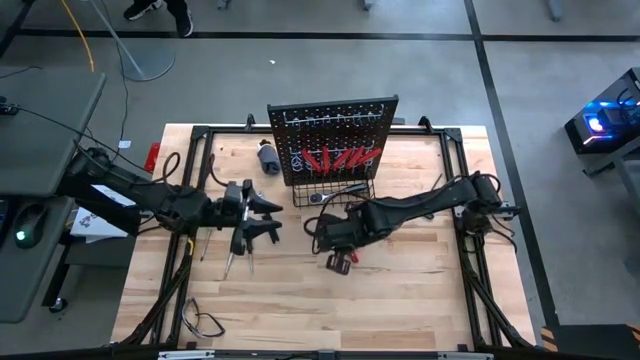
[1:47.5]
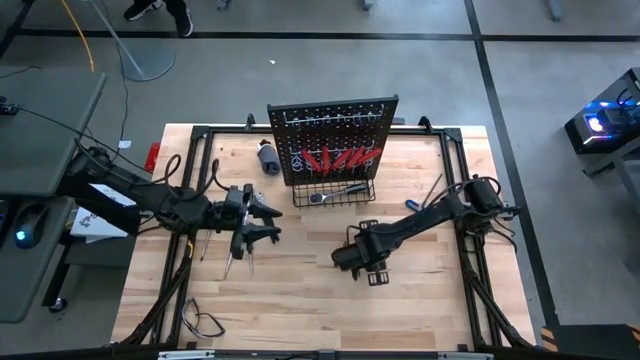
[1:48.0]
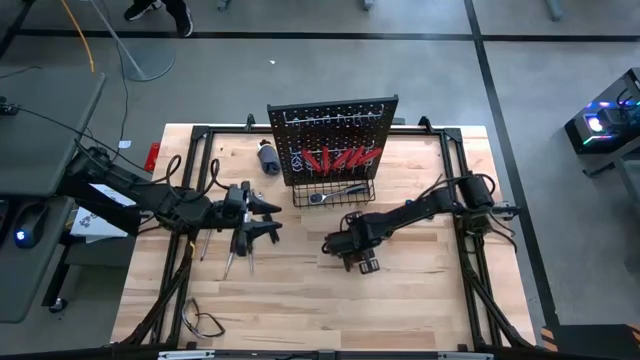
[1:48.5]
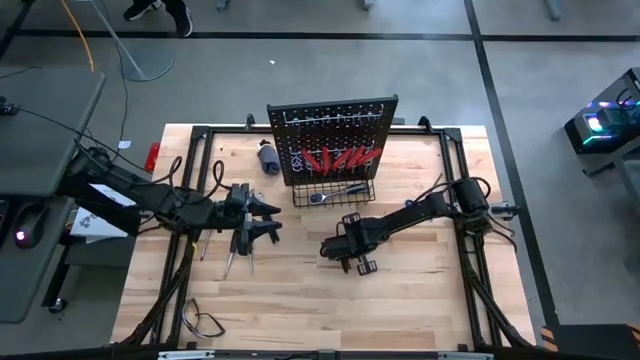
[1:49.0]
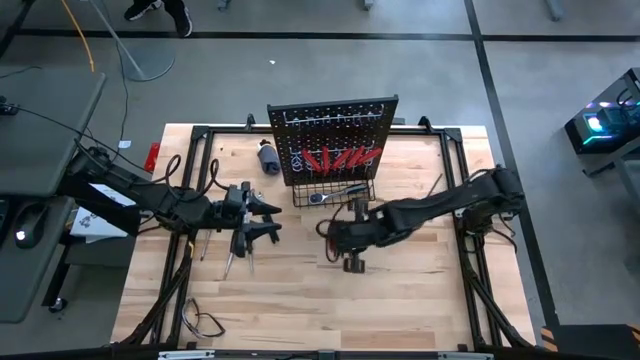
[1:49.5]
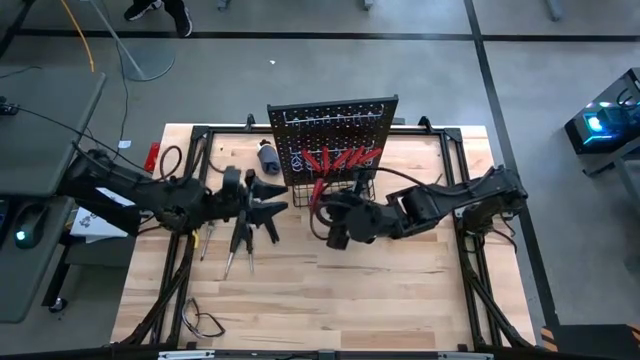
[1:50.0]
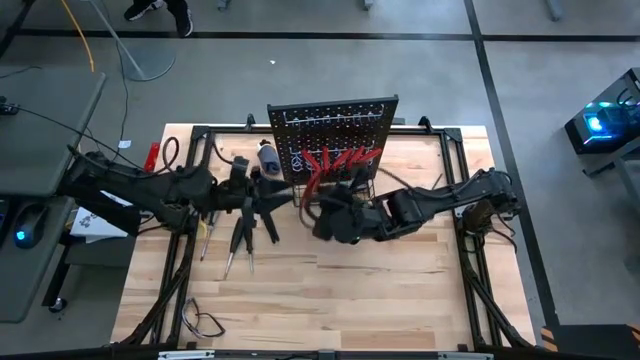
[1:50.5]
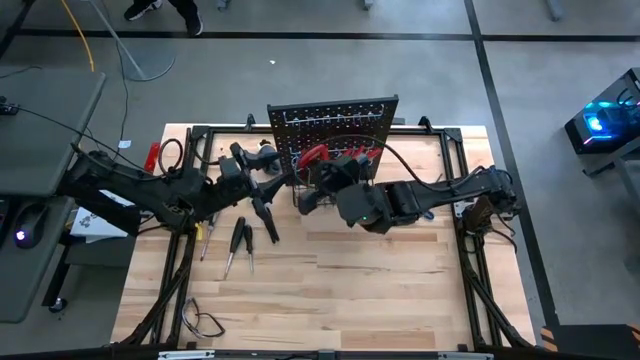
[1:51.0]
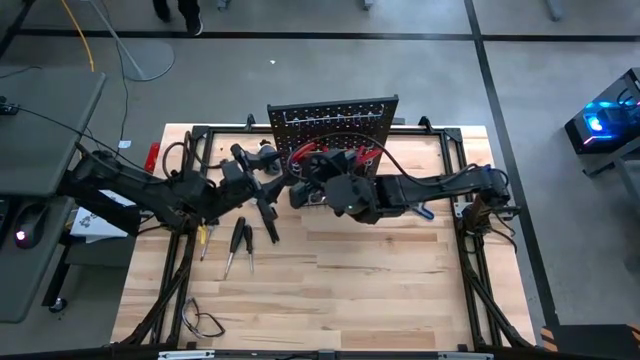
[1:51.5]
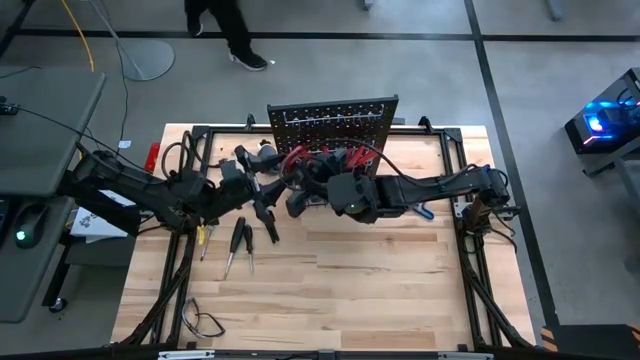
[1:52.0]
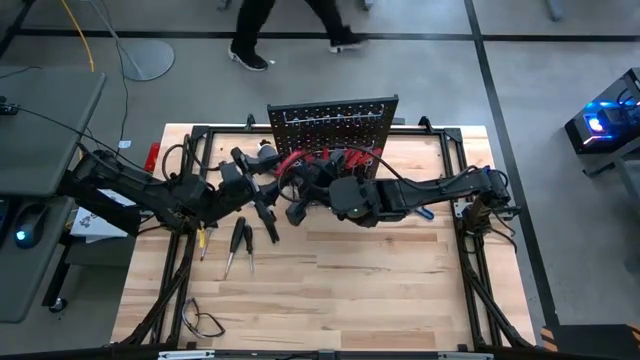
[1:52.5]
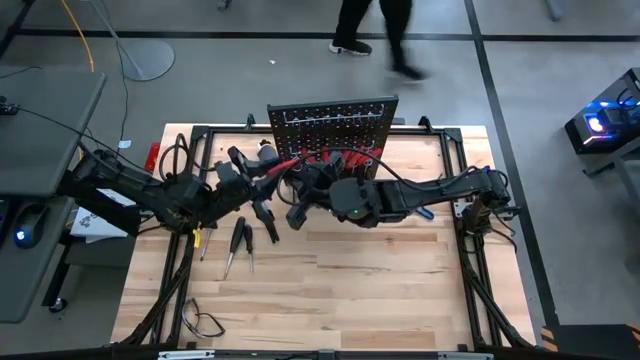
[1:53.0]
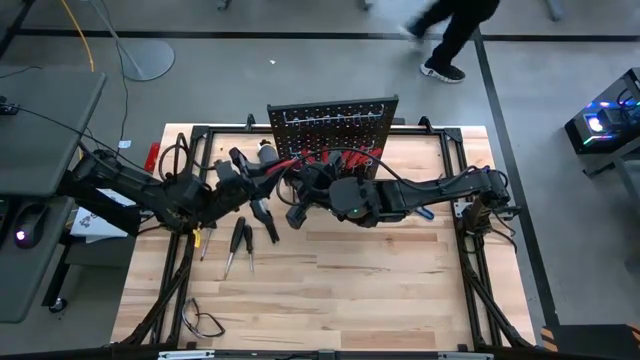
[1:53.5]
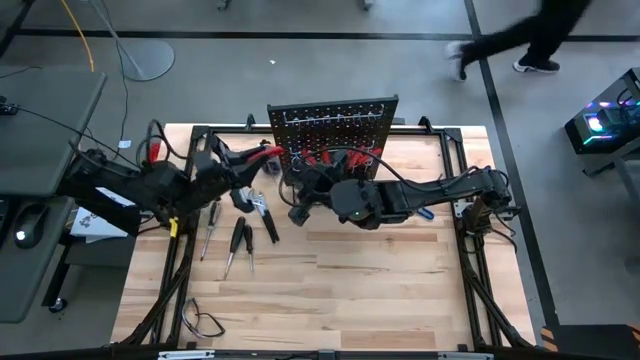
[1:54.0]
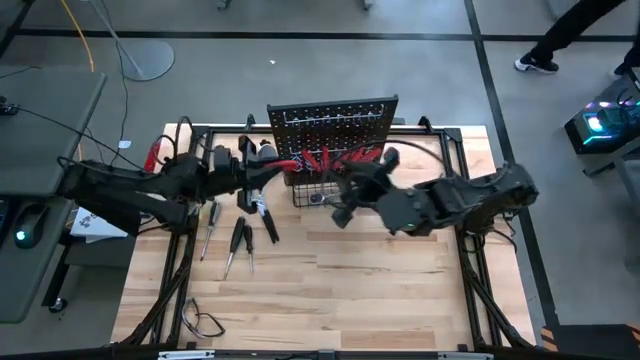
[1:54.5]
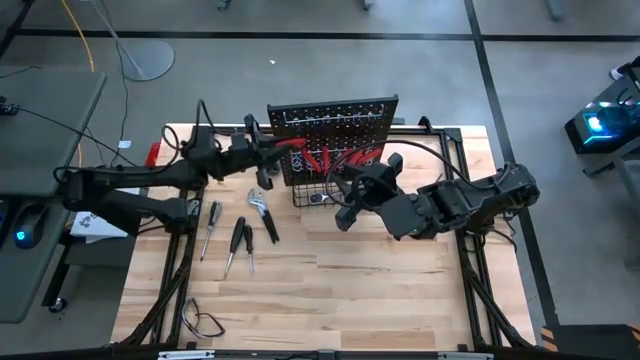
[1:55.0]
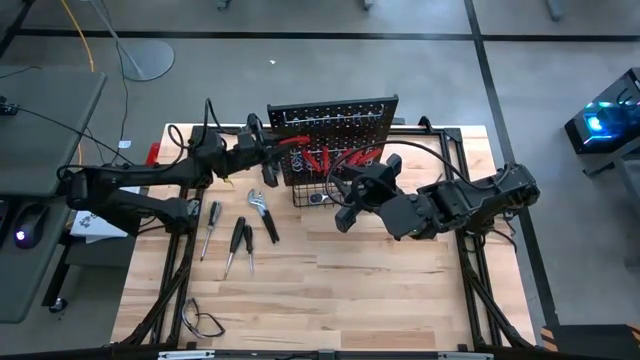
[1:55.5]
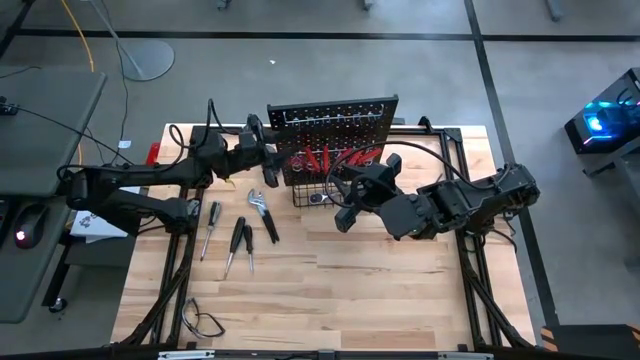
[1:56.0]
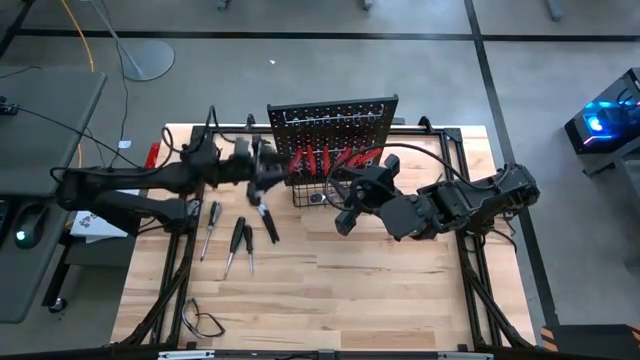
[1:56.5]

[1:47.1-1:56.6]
Task: Hang tools onto peg board
Hang the red allen wrench on the peg board

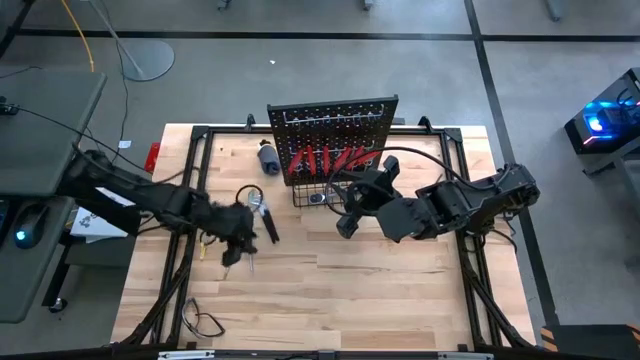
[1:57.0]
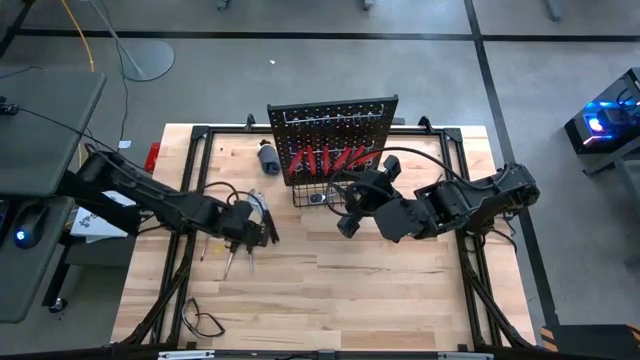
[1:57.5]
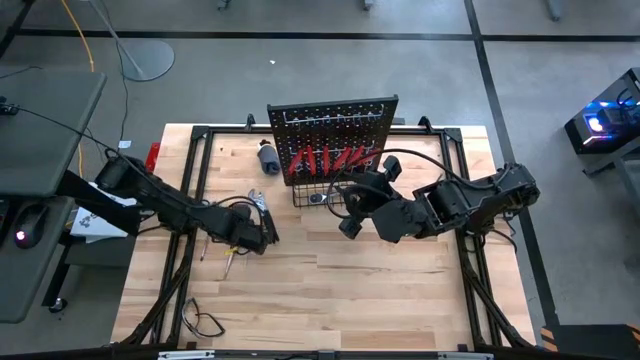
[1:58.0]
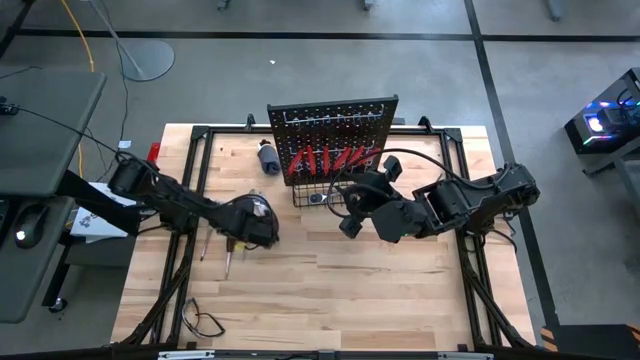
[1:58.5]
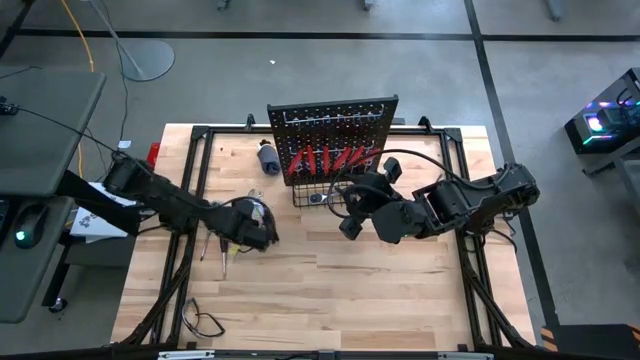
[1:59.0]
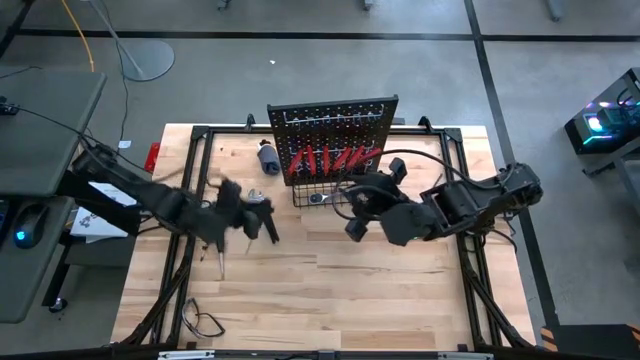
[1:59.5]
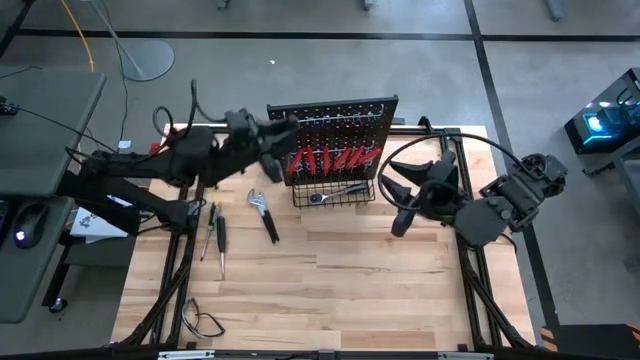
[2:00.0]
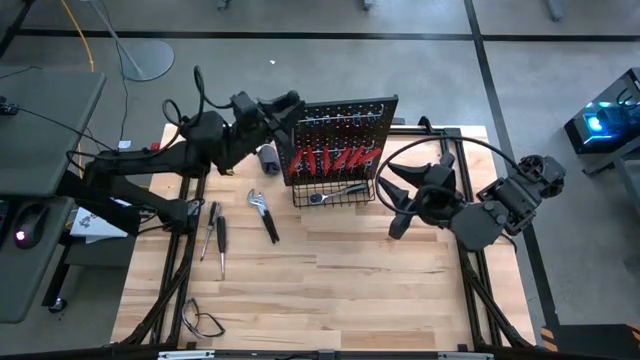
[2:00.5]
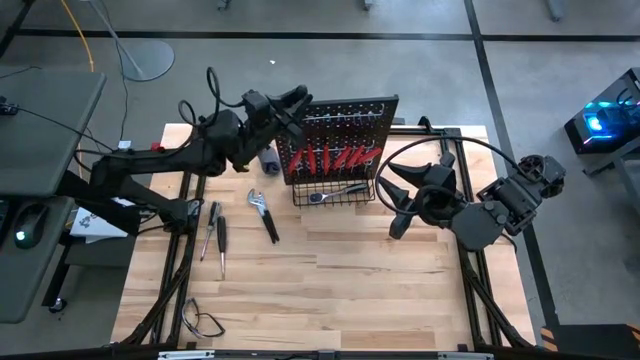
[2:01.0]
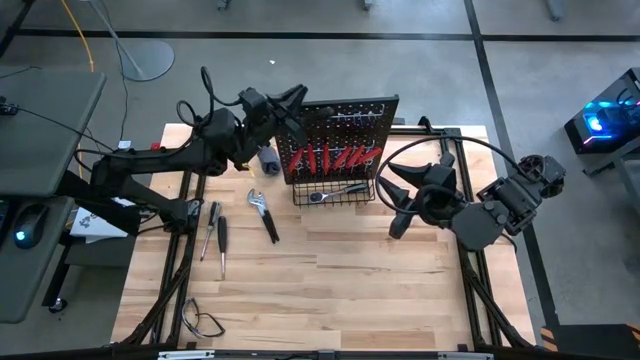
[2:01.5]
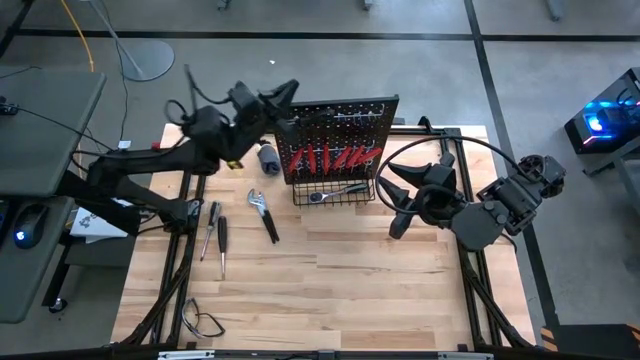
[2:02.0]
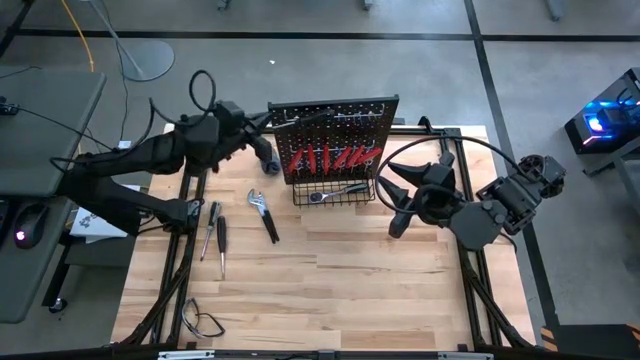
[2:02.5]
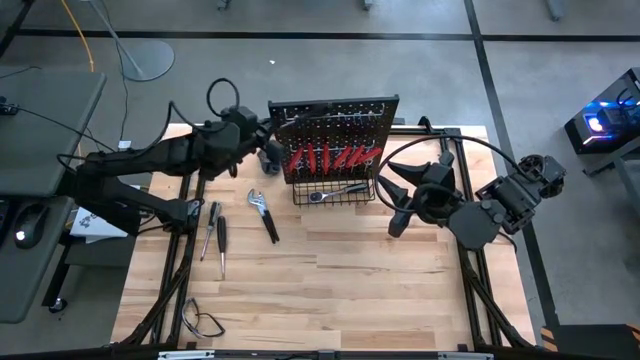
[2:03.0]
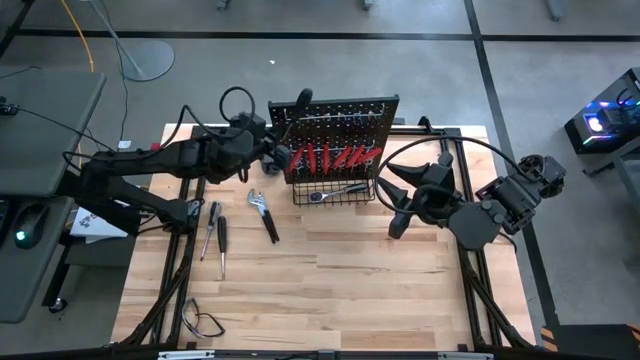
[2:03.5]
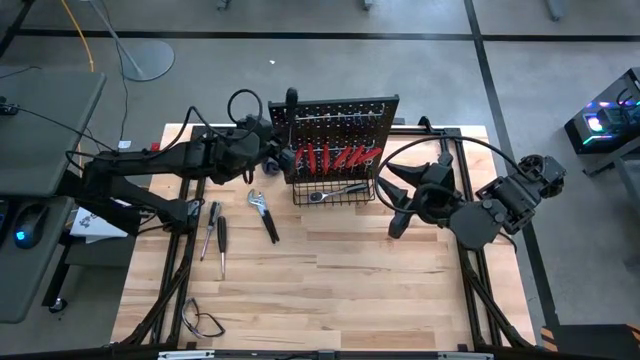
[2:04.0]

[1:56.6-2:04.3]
Hang the black screwdriver on the peg board

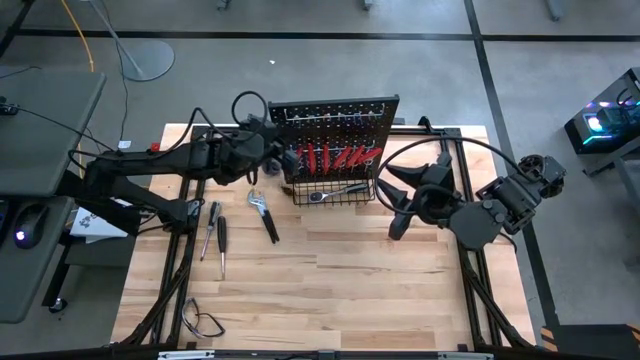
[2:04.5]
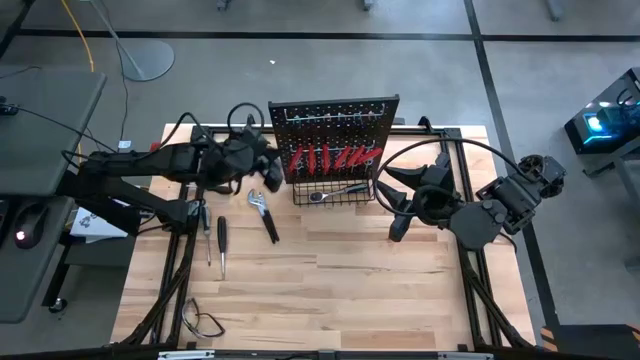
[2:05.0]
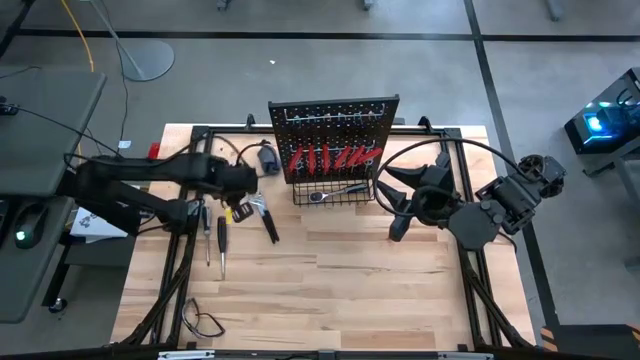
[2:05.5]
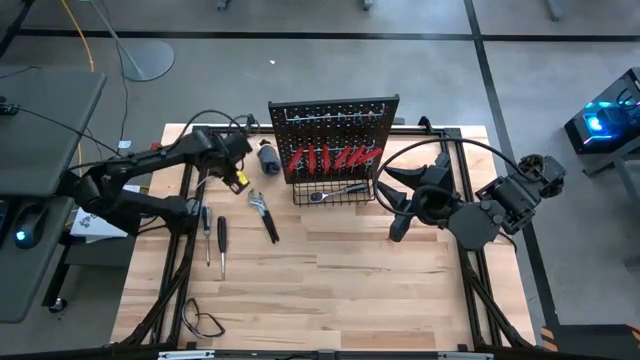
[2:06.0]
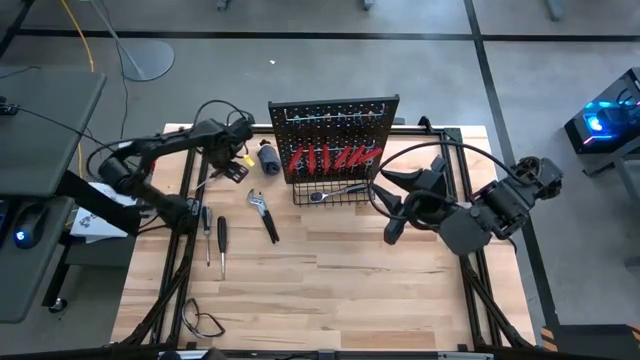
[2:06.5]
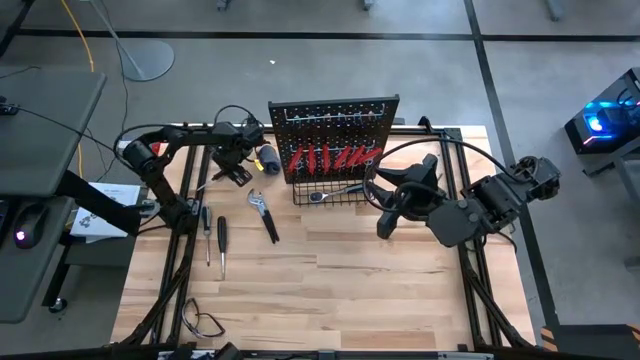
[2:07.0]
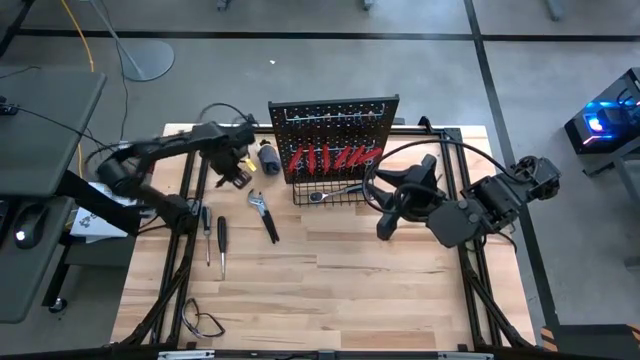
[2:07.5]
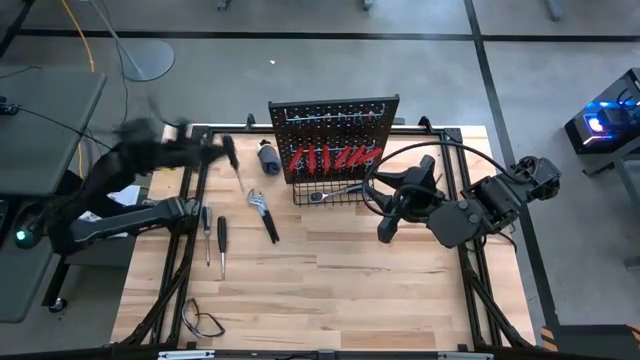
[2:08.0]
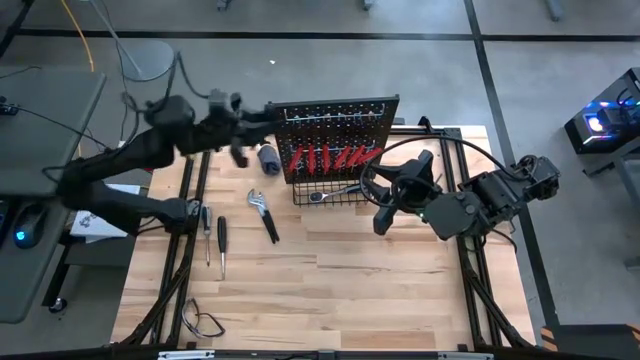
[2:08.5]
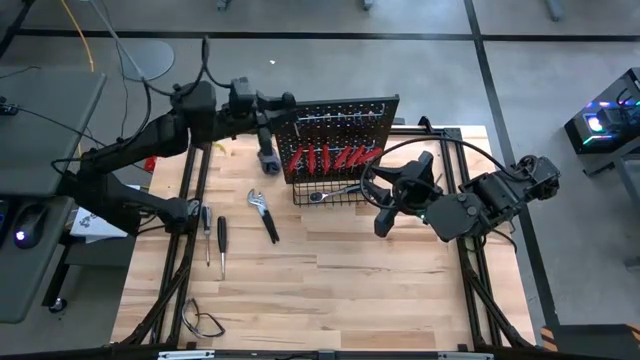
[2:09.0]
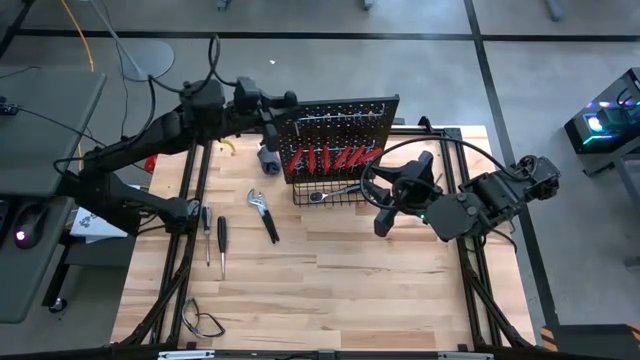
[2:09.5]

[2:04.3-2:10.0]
Hang the black screwdriver on the peg board
